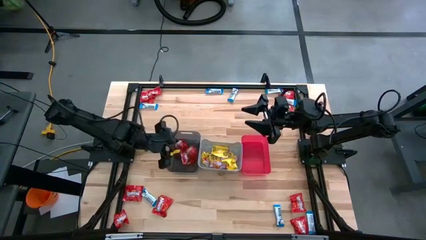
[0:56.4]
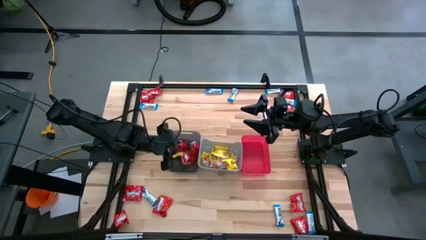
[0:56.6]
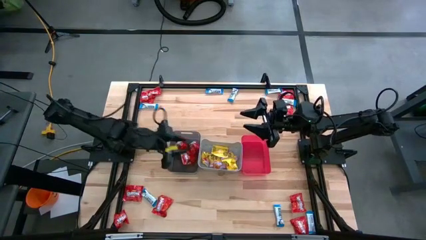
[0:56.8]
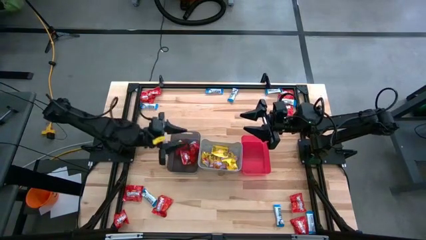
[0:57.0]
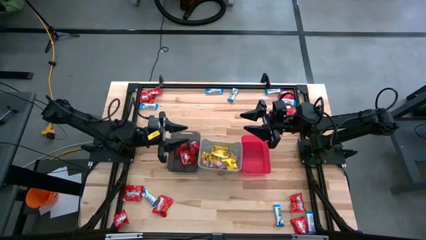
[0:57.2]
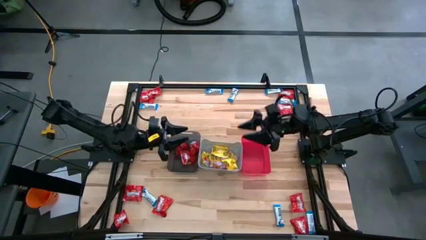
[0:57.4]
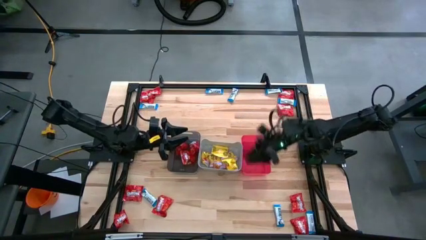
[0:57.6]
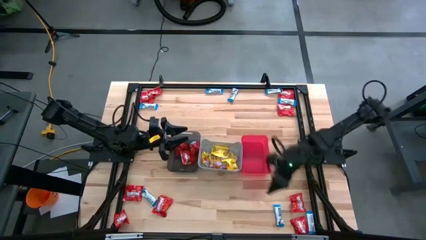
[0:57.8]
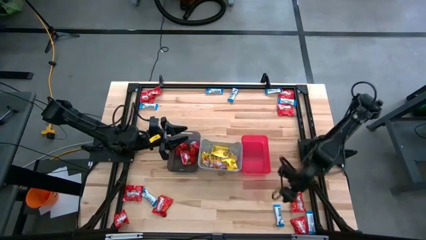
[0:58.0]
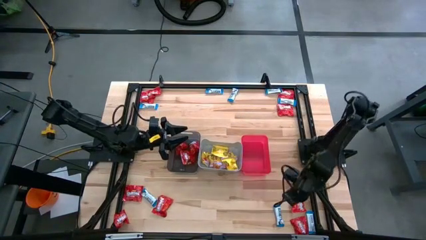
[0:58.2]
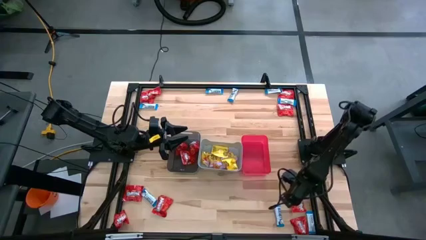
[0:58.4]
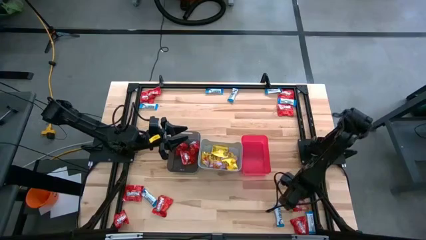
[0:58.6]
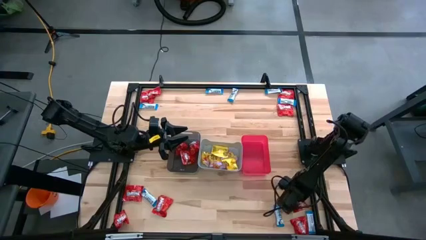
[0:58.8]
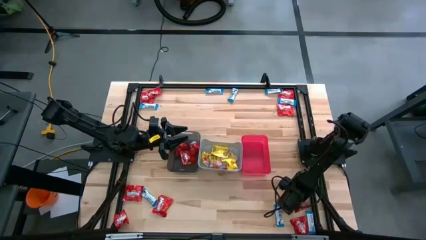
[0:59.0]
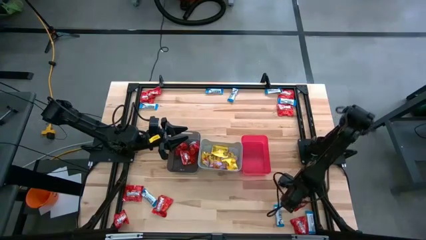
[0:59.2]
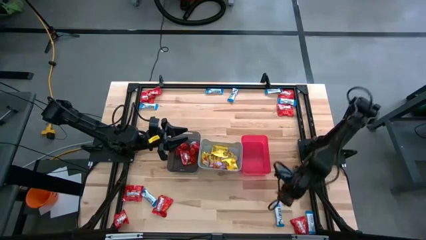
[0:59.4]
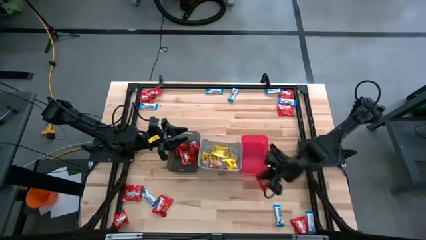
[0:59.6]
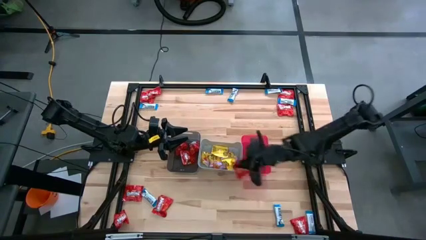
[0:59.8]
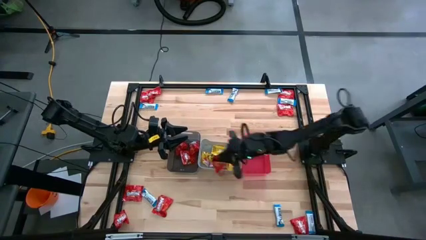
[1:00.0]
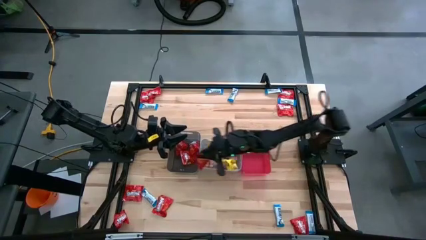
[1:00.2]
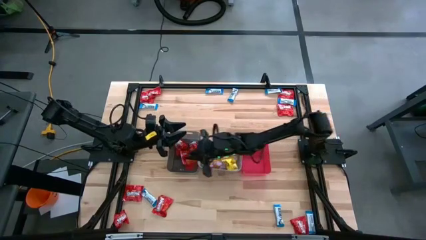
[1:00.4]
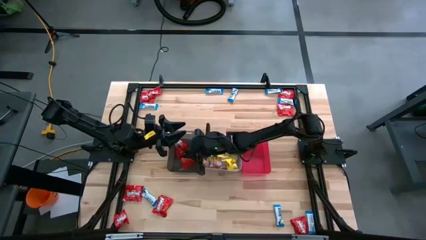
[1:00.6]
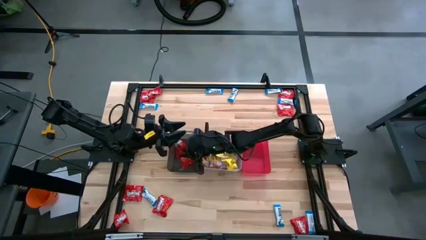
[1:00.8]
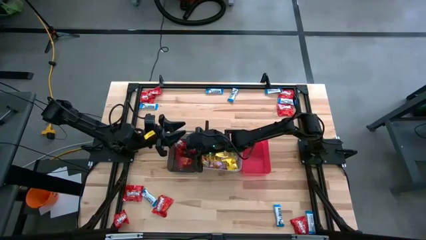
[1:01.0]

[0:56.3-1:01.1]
Task: Sort candy
Put the red candy into the black bin

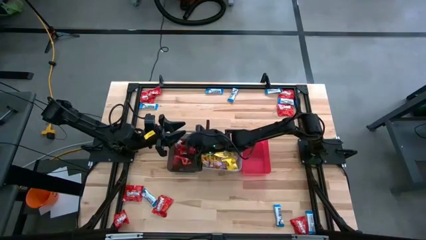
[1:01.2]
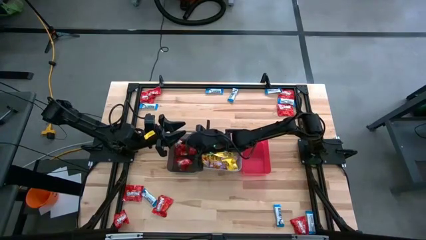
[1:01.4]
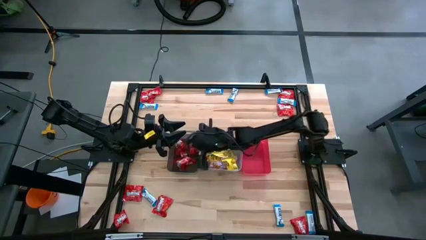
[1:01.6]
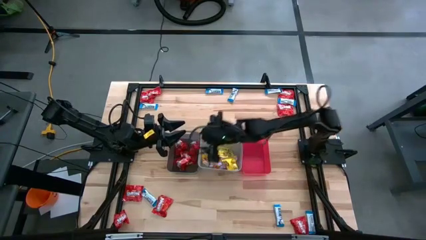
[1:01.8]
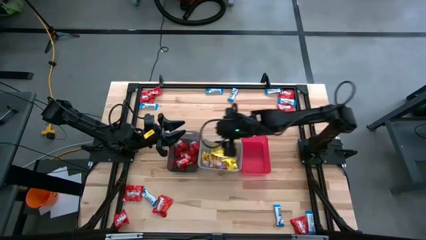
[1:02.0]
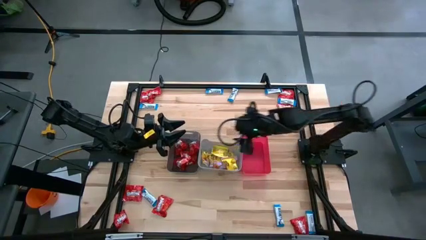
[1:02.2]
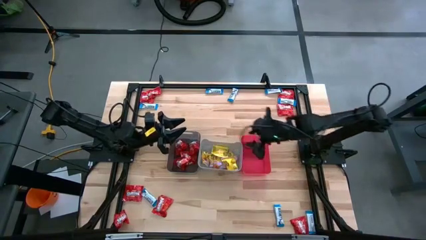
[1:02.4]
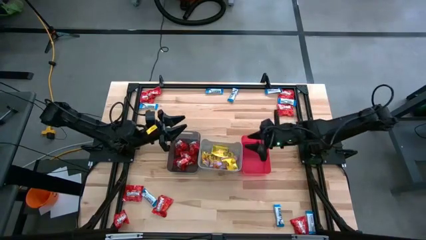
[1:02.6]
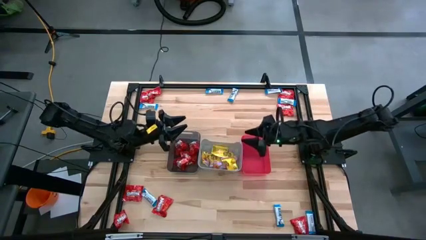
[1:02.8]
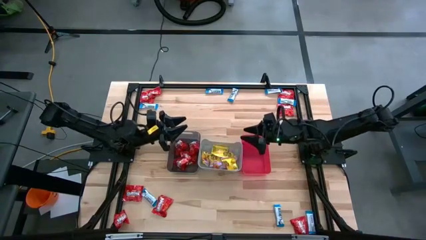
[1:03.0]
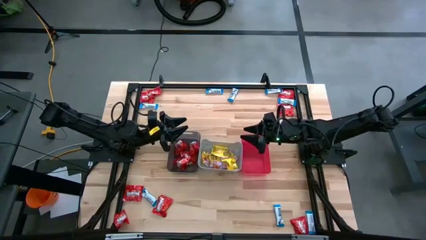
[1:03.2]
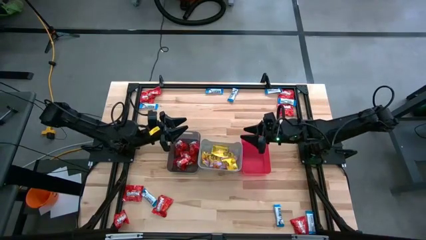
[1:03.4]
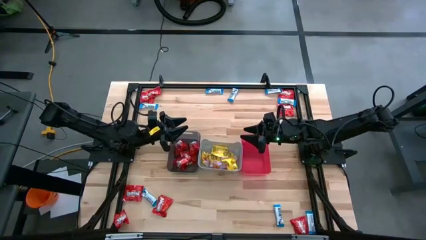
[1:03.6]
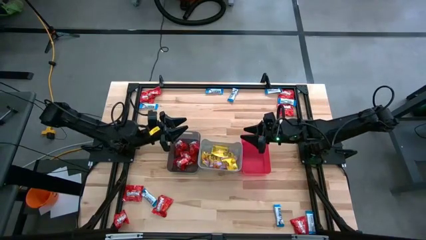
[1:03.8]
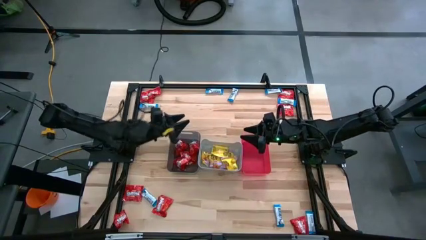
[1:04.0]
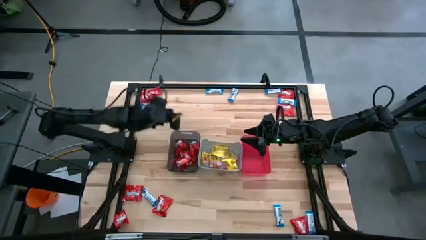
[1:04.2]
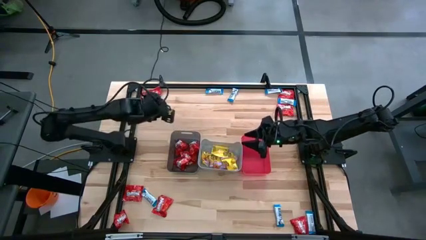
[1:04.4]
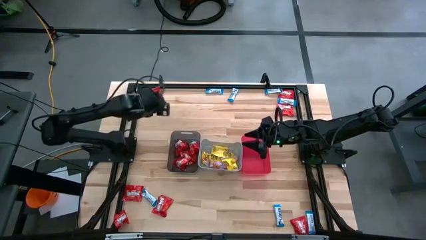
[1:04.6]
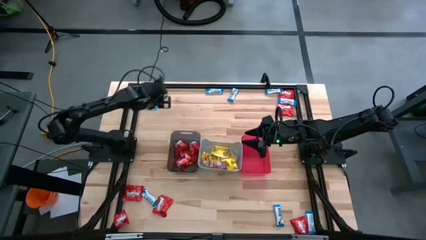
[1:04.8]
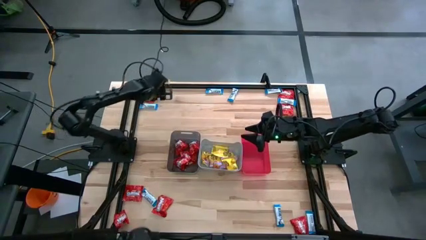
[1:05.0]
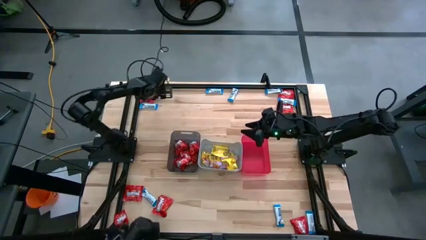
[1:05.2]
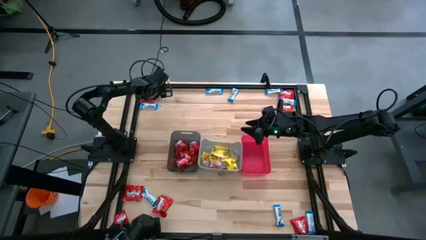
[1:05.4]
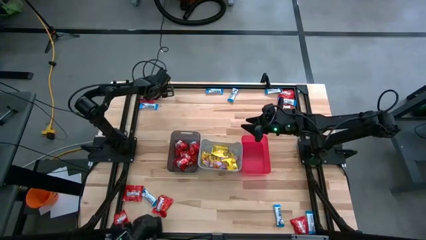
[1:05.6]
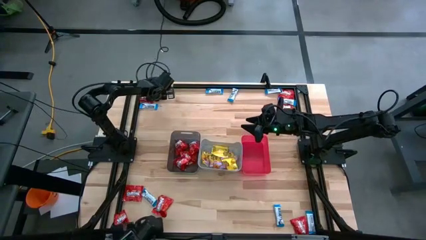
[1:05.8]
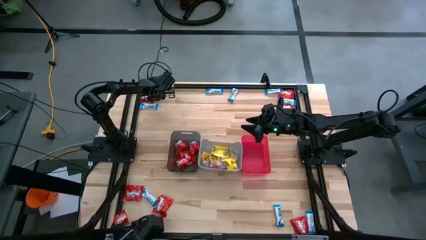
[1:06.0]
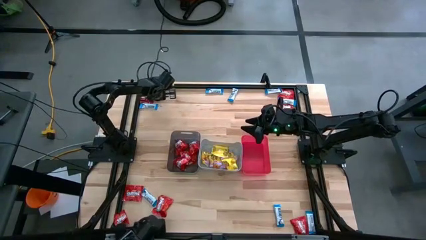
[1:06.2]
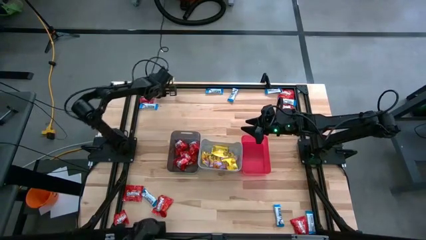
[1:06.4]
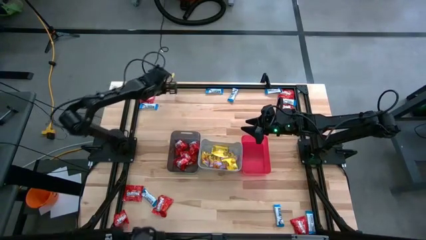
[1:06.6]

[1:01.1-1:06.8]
Put the red candy into the black bin

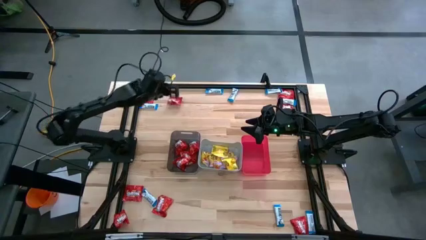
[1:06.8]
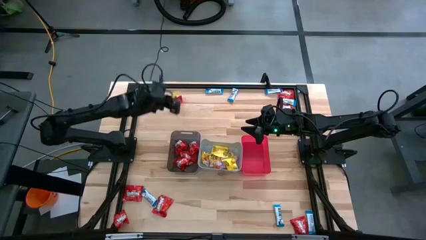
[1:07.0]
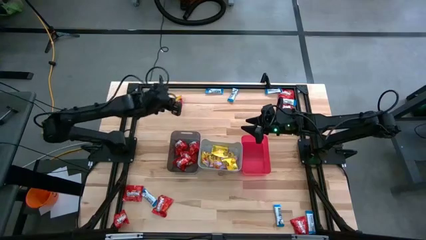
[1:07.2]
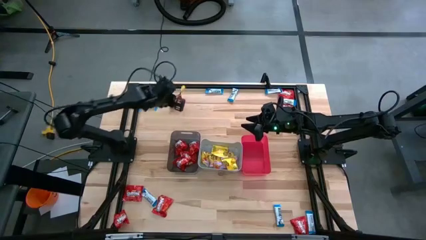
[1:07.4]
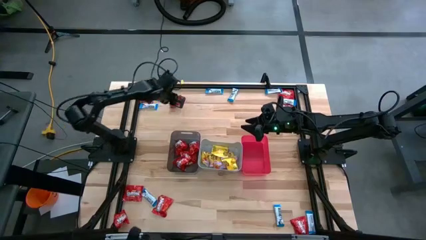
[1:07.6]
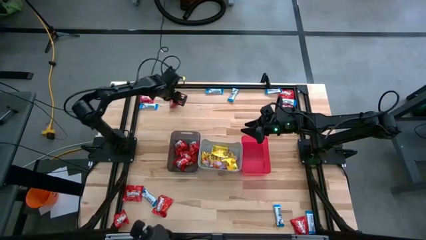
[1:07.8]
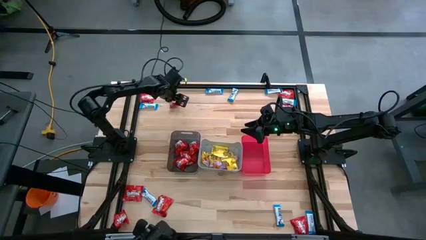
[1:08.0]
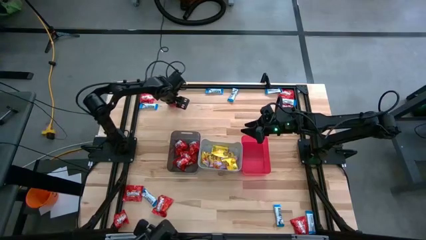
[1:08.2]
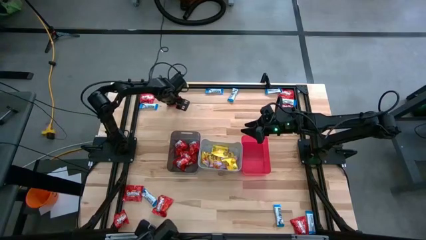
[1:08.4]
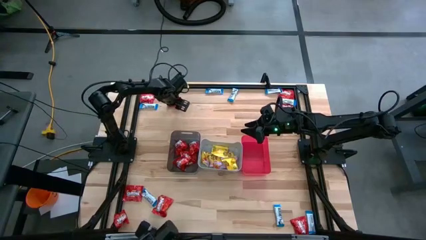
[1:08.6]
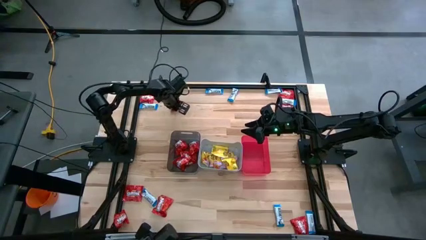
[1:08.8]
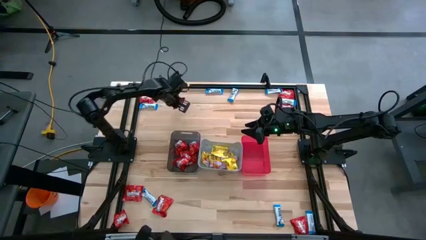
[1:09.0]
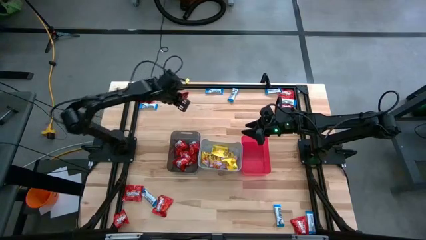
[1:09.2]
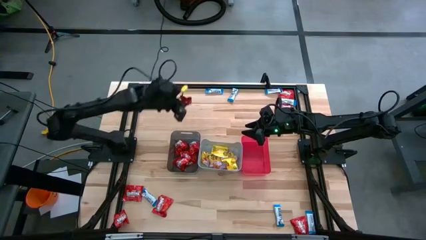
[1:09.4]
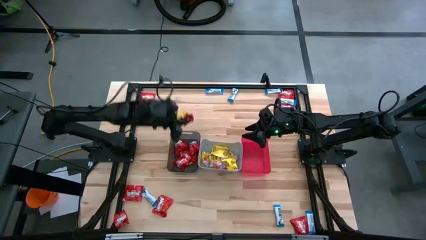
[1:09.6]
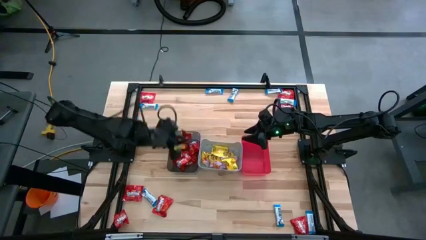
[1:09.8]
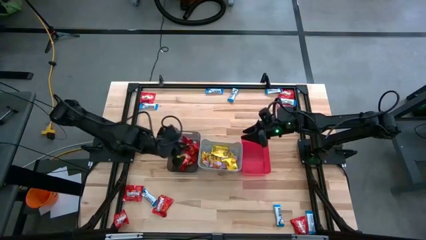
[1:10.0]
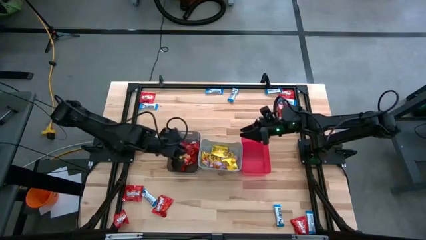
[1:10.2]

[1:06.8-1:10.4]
Put the red candy into the black bin

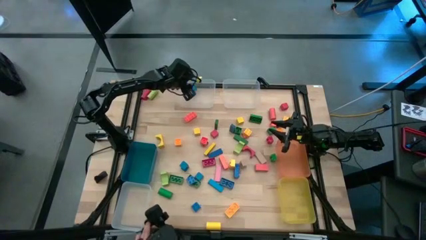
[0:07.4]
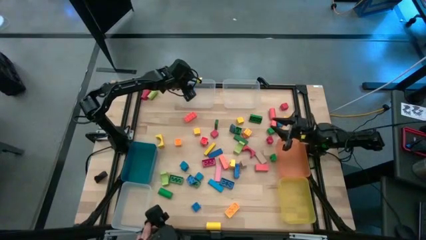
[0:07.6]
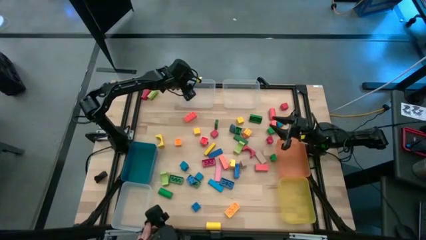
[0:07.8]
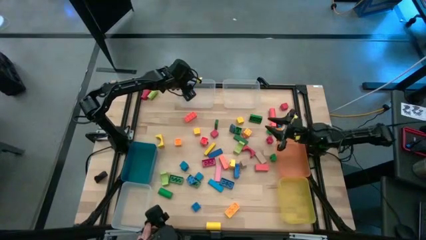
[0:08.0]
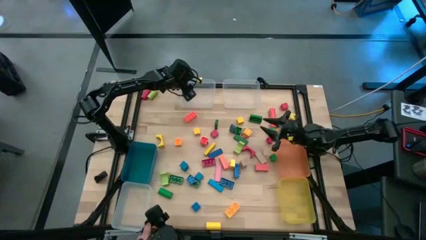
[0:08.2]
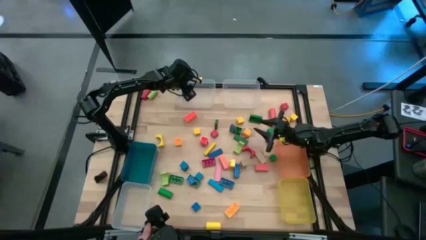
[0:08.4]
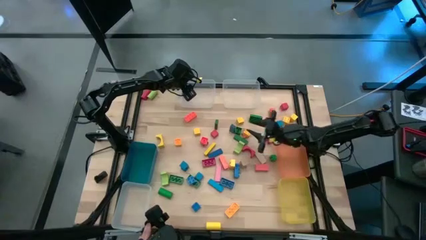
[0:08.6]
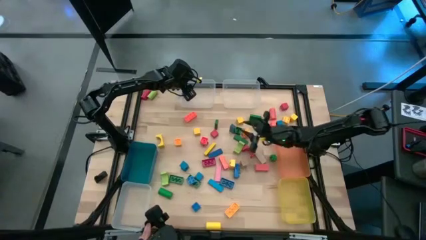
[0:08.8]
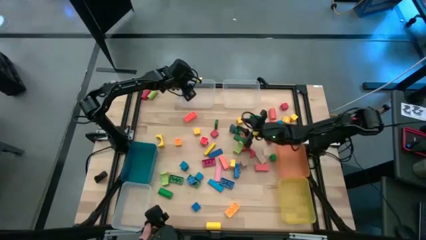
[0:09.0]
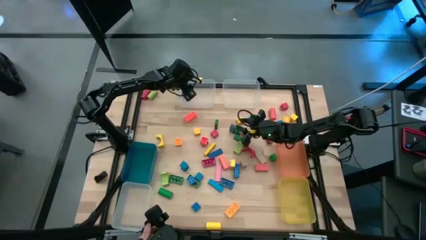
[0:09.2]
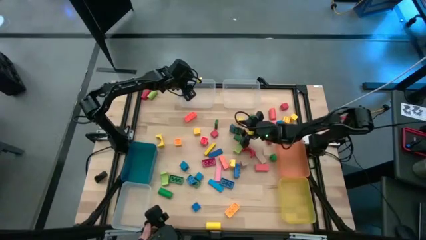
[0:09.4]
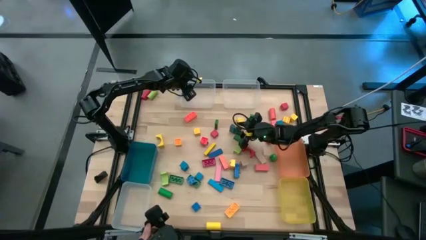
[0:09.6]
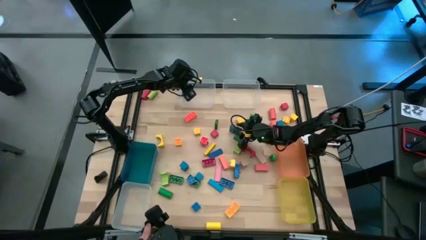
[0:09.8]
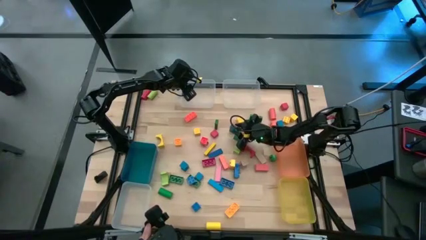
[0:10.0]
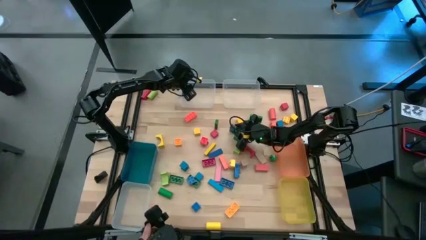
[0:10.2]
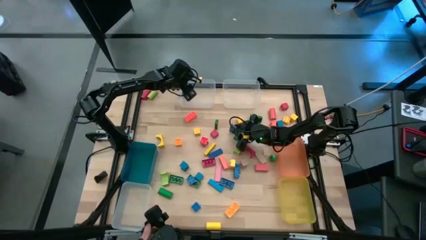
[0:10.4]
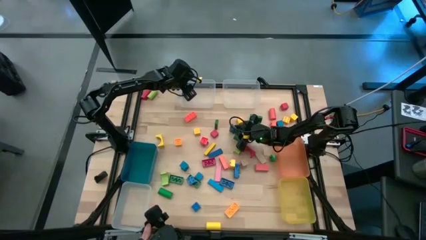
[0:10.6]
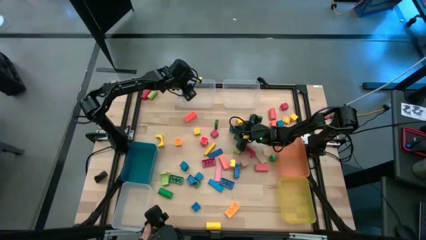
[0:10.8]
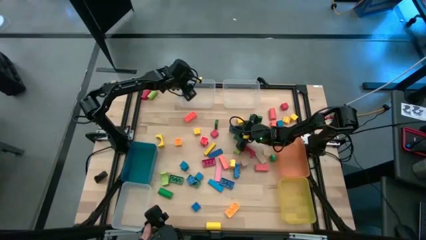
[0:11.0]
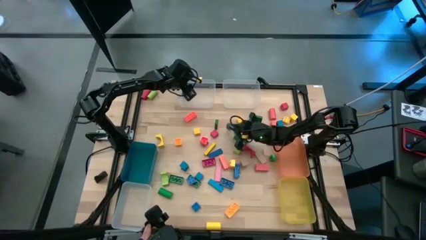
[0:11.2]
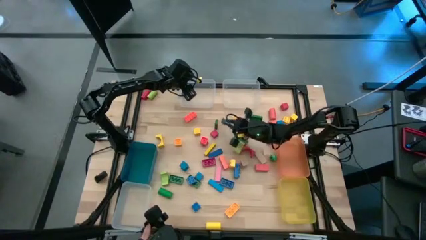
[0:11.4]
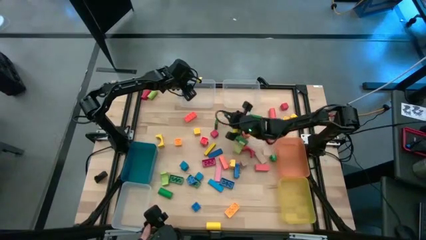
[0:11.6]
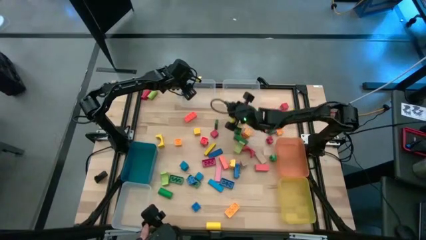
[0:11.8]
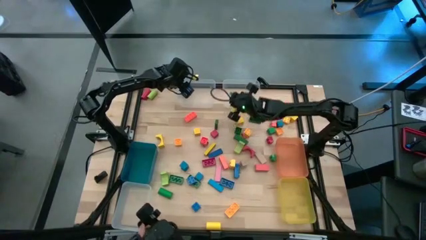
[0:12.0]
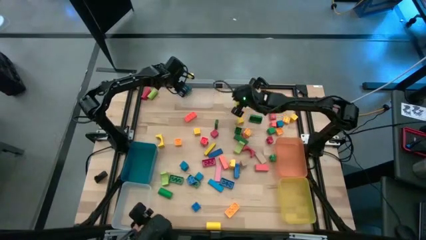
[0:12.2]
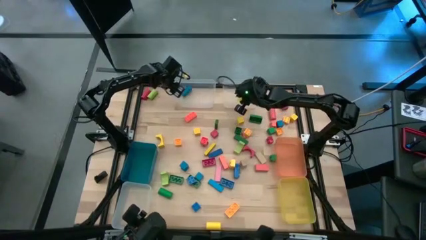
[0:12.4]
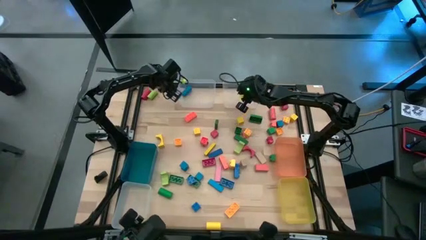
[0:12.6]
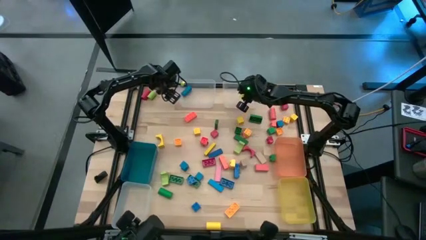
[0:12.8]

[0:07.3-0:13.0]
Task: Sort blocks by size
Put the blue block into the top right transparent bin
